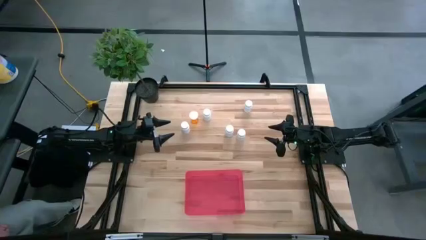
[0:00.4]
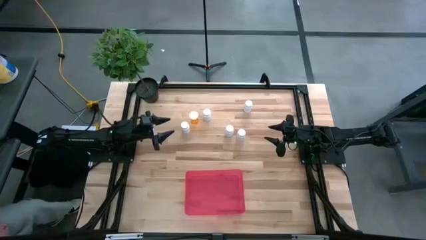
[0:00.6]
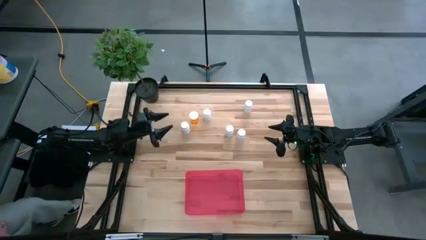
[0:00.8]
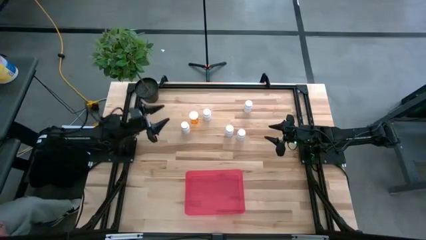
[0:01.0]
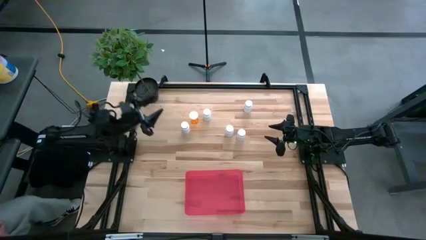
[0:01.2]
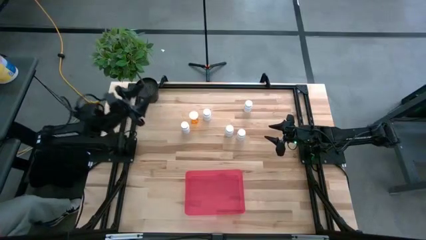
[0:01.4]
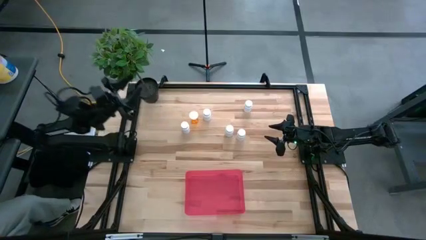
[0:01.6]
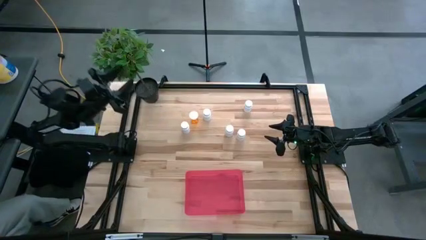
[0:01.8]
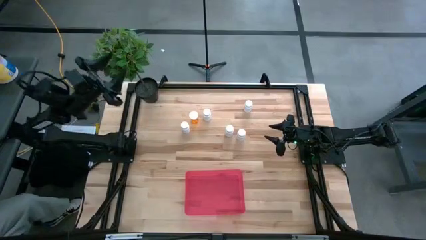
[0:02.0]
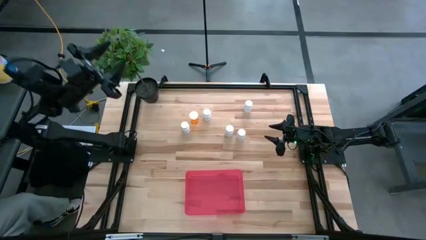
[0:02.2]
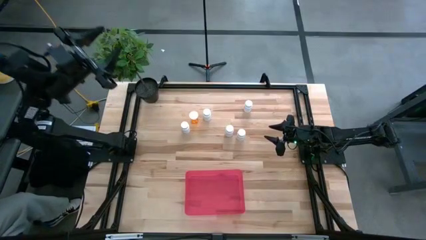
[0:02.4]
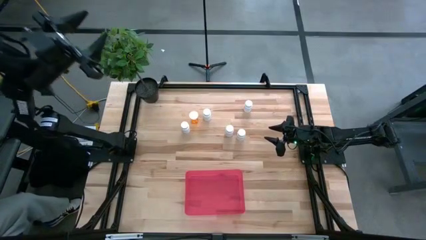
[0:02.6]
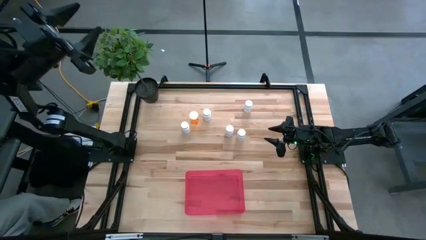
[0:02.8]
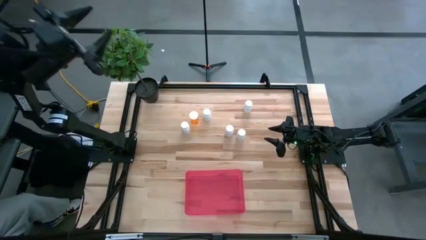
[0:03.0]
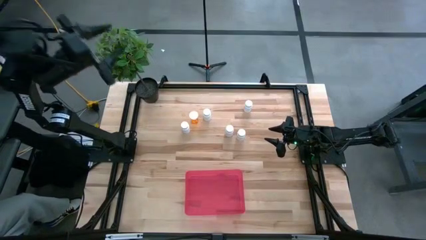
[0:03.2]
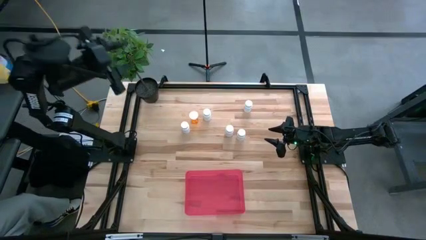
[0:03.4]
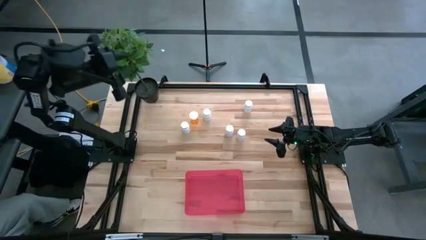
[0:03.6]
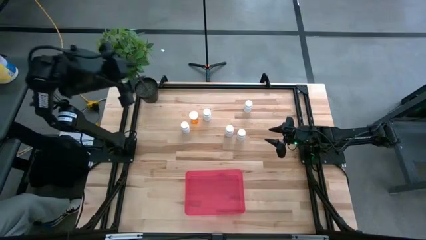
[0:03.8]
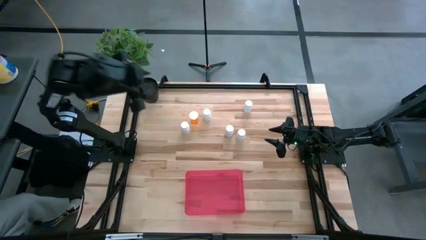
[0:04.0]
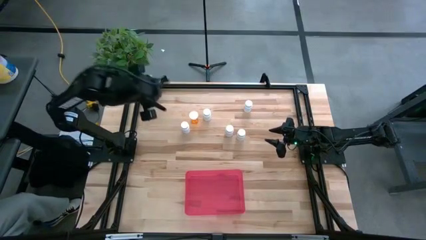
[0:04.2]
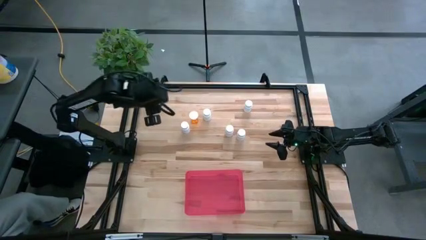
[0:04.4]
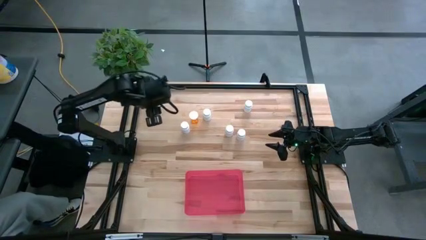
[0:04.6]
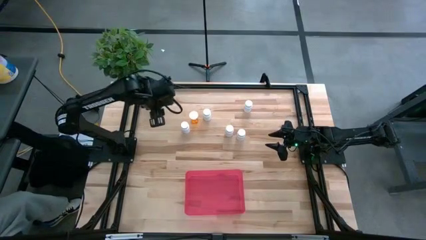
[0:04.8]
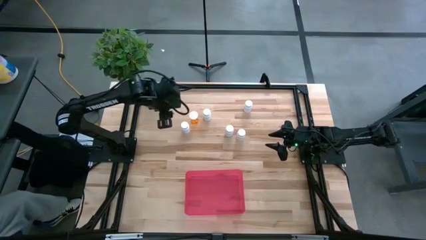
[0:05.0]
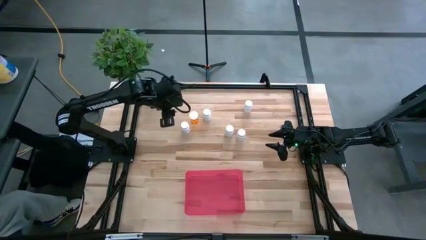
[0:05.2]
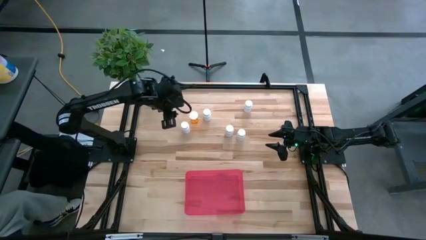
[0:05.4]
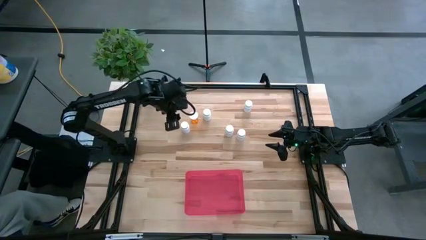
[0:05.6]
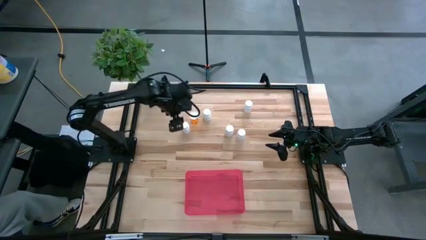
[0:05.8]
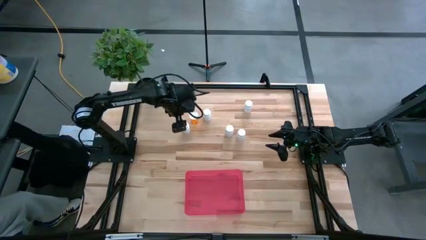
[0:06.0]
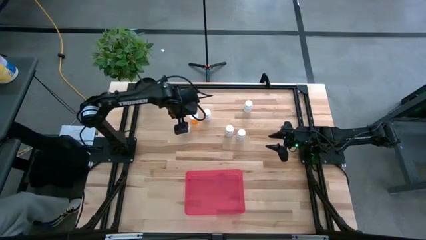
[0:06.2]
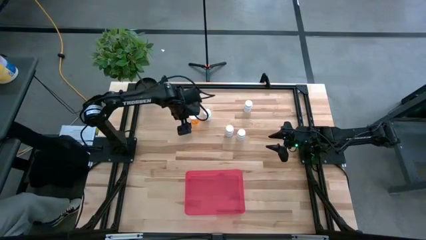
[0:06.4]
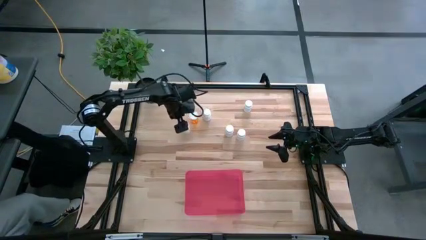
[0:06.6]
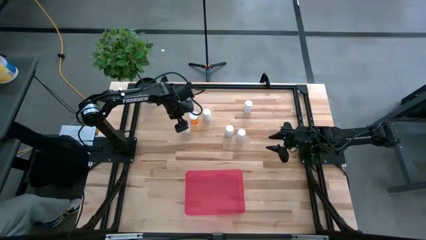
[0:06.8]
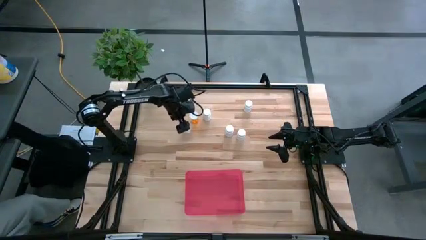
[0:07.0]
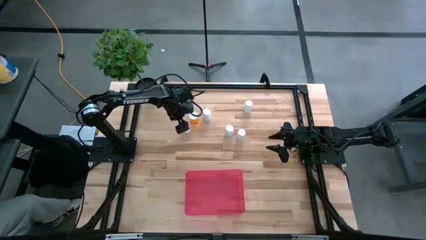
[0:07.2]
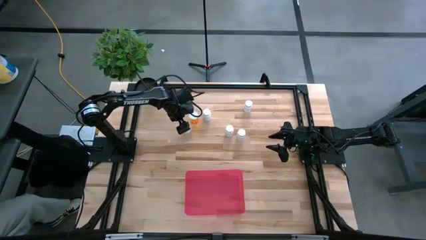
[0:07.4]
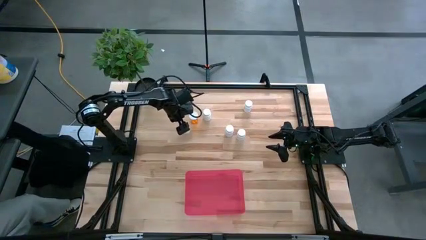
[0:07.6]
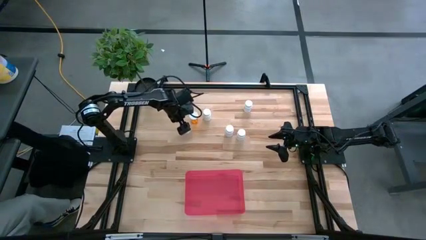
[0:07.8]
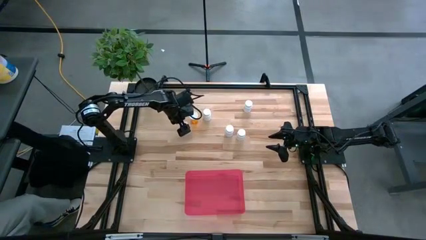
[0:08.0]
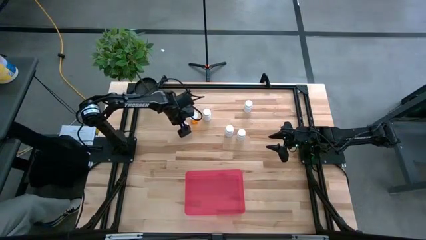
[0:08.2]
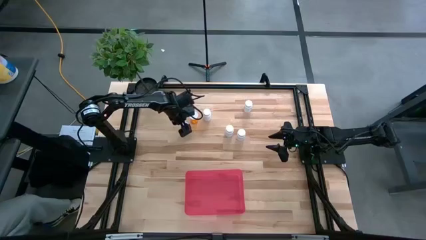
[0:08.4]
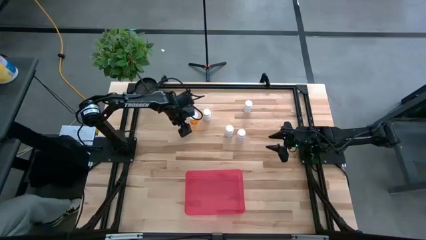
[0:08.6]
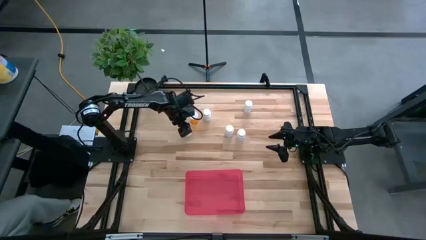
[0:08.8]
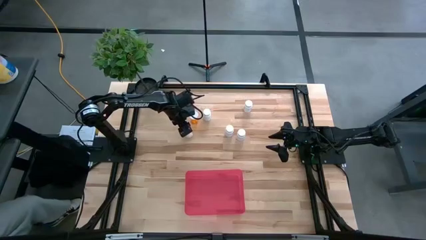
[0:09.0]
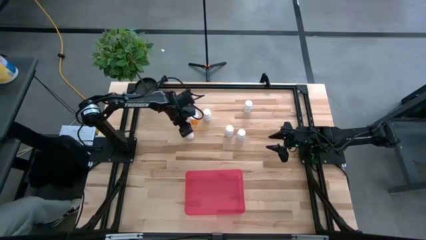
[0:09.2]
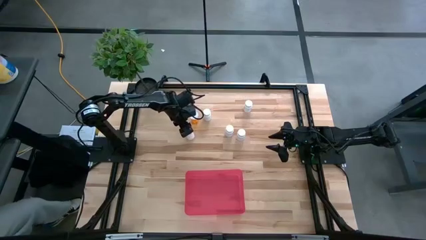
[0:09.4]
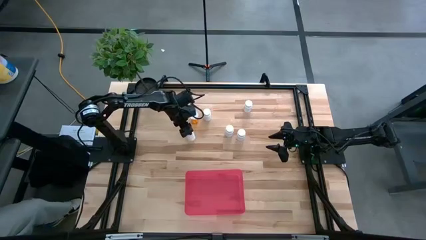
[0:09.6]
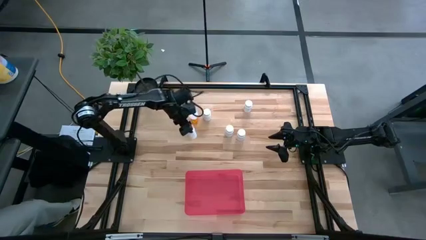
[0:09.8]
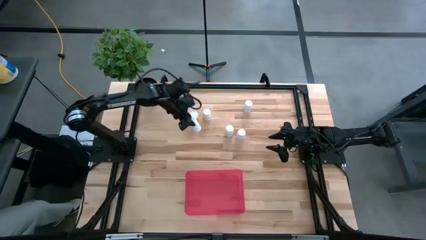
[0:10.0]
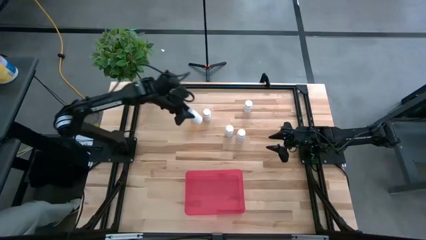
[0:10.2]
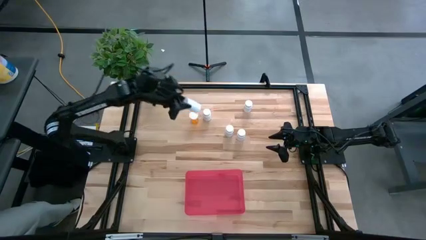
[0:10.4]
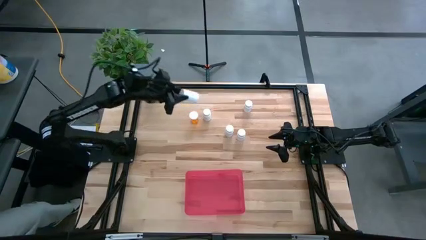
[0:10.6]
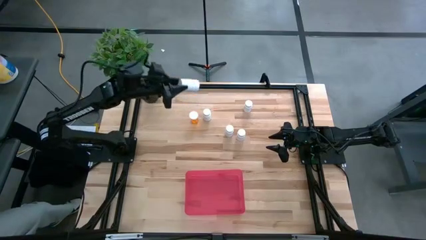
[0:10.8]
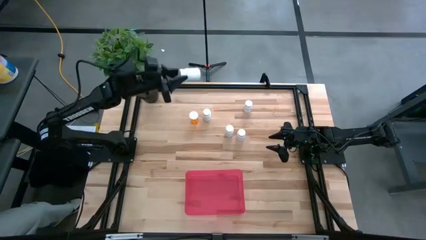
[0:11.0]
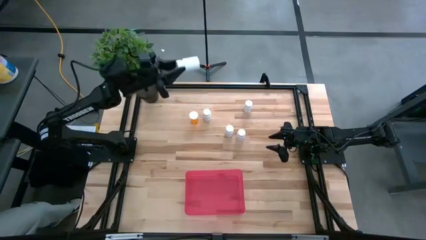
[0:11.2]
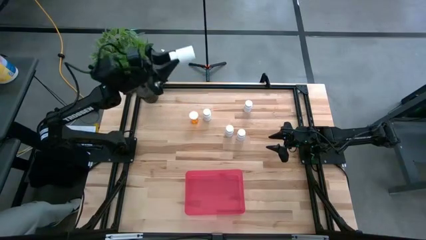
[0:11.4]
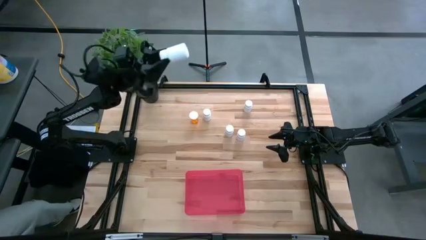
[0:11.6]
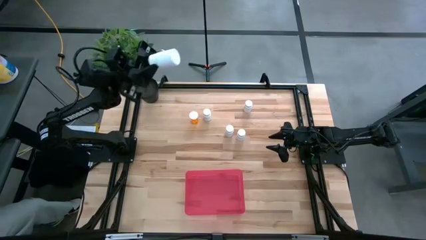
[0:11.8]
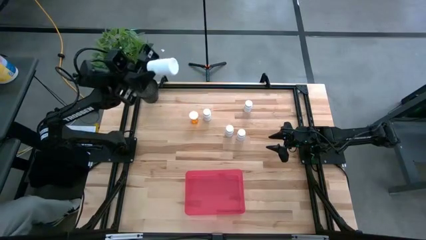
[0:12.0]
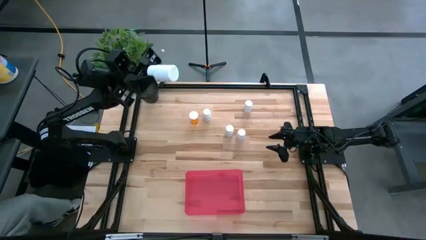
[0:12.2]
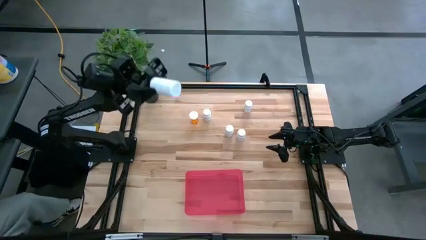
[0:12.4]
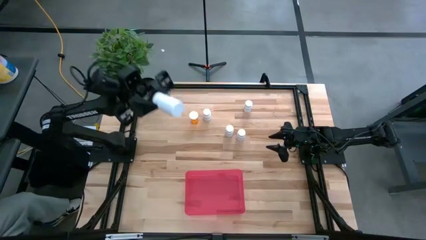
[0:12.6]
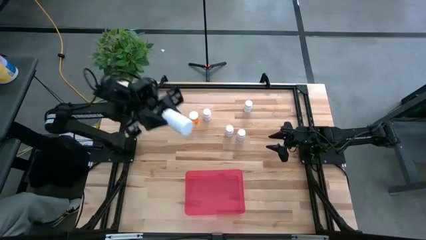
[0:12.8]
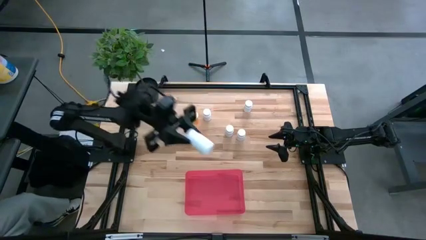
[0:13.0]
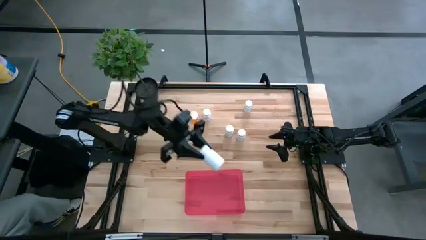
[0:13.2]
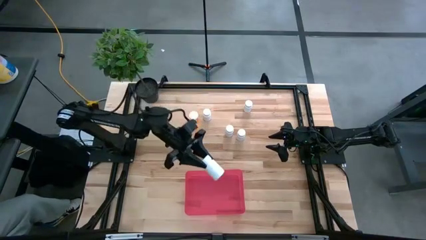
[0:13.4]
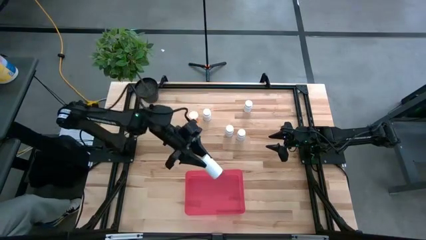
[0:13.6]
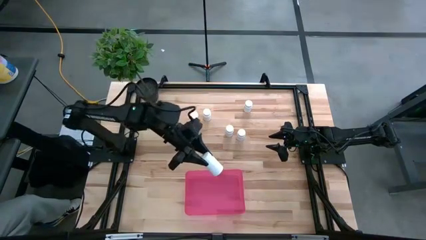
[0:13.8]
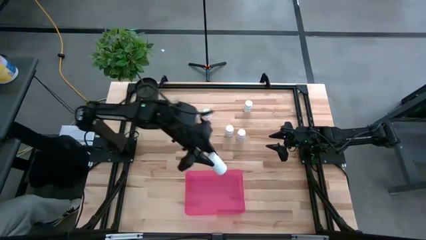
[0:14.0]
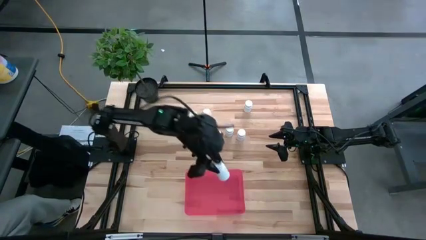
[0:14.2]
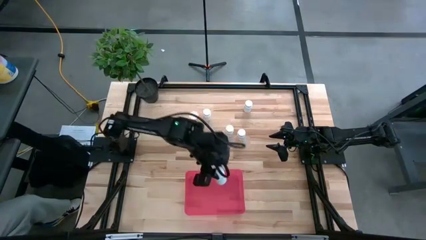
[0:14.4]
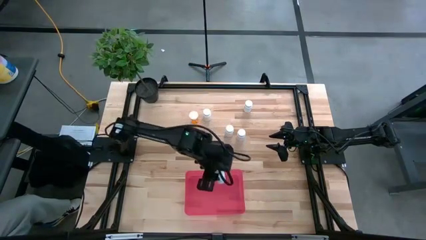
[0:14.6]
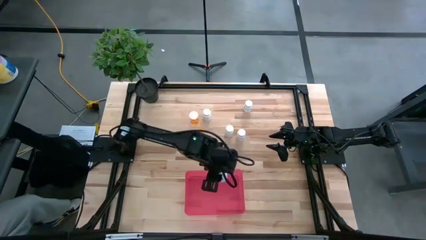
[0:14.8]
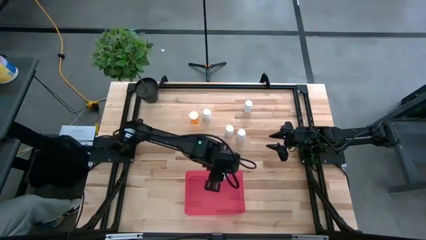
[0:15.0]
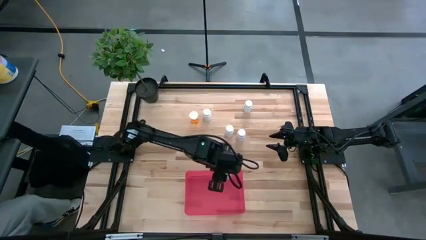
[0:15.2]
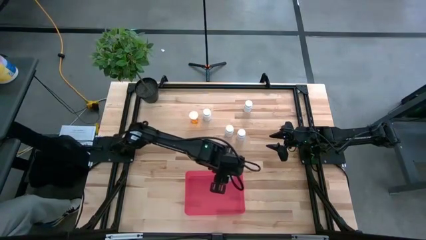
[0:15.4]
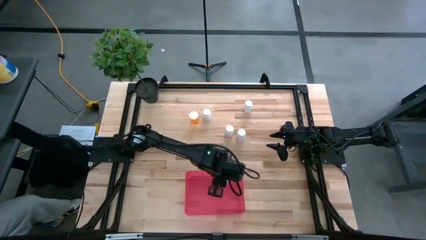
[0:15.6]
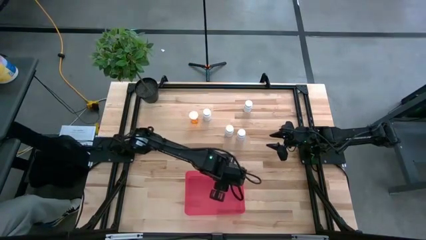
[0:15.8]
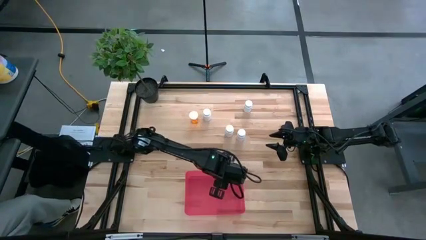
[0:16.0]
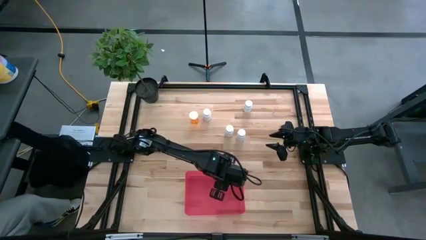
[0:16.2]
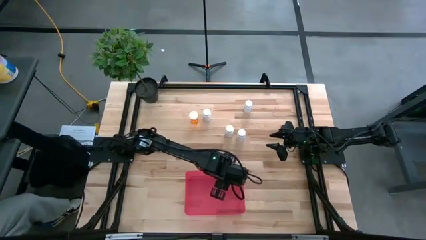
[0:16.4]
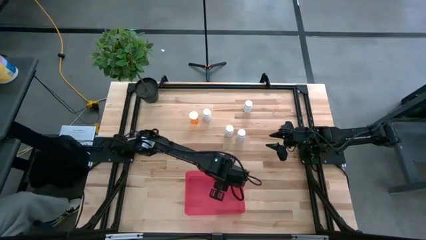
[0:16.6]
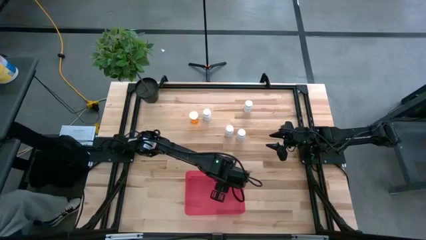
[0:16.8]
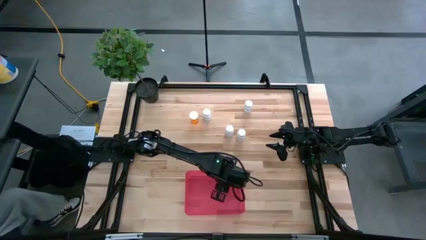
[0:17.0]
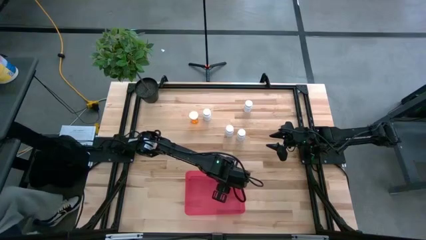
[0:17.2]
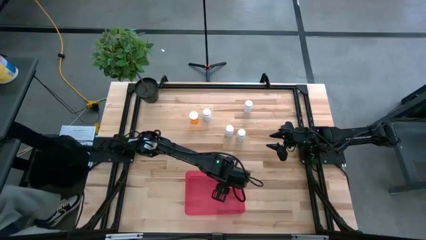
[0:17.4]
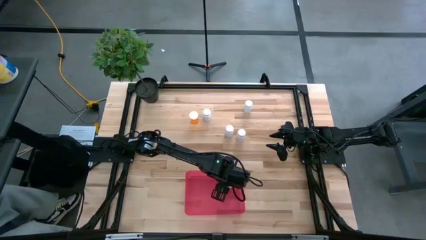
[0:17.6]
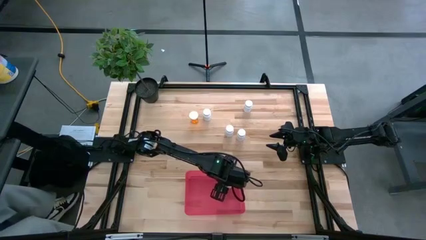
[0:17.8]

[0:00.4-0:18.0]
Task: Pick and place pill bottles into a basket
Put the white pill bottle into the pink bin
